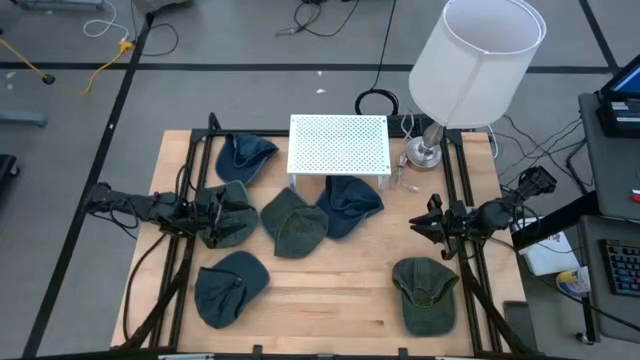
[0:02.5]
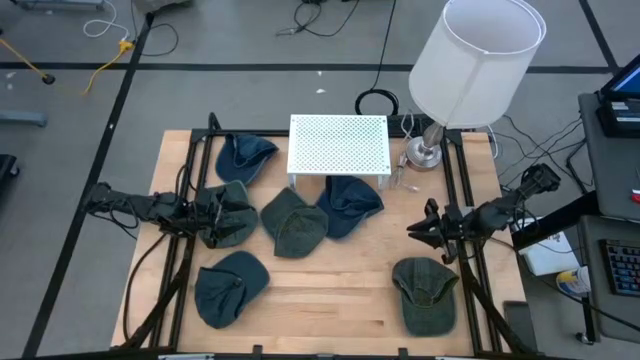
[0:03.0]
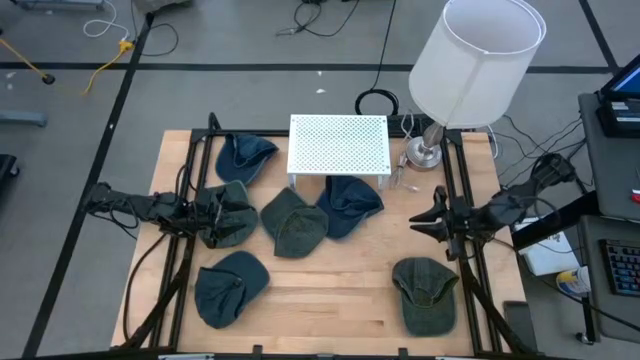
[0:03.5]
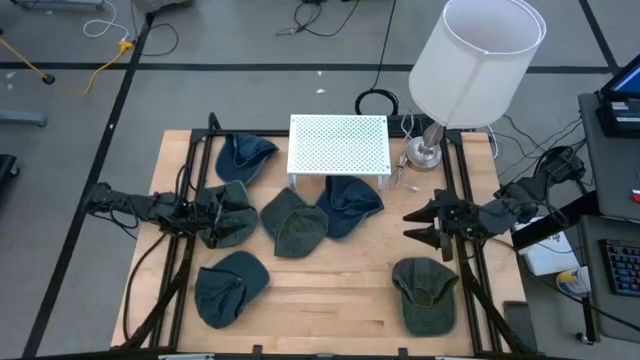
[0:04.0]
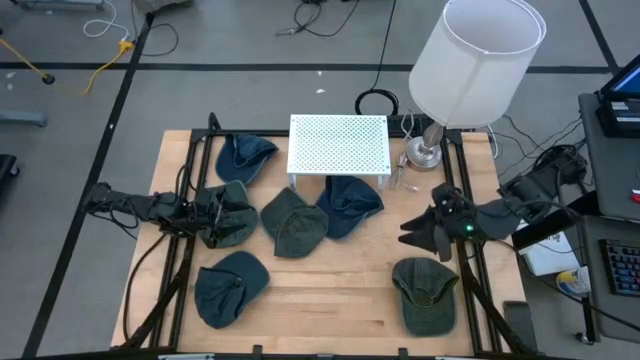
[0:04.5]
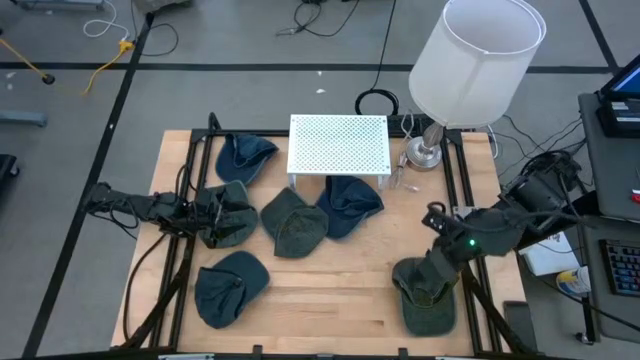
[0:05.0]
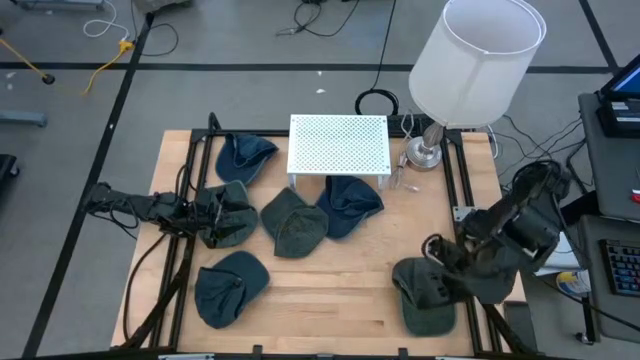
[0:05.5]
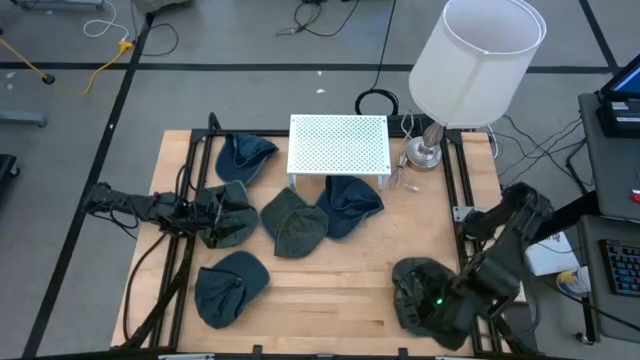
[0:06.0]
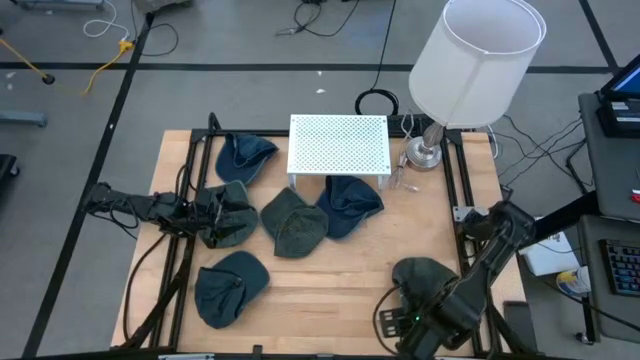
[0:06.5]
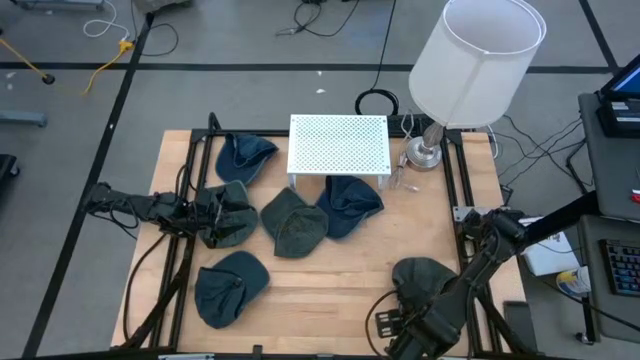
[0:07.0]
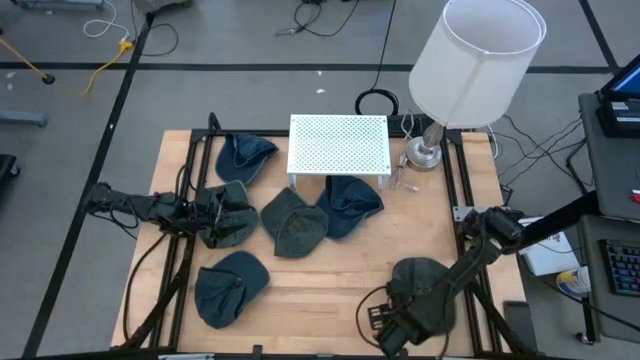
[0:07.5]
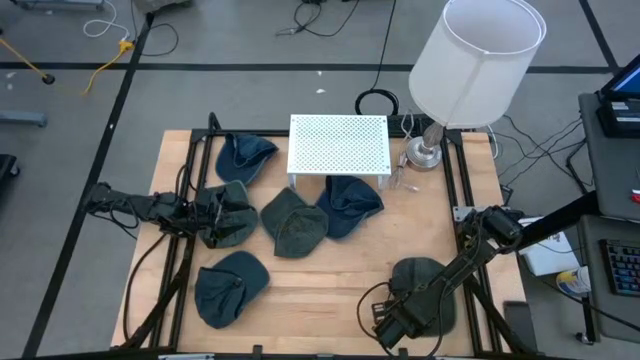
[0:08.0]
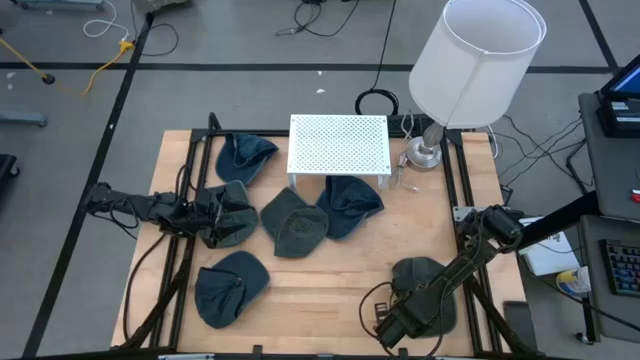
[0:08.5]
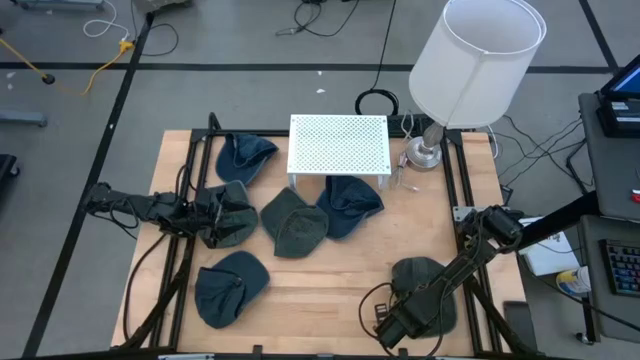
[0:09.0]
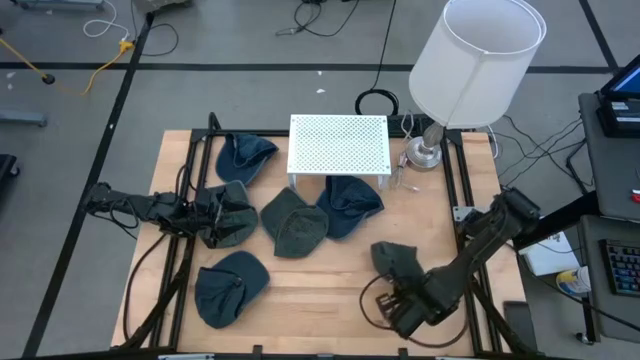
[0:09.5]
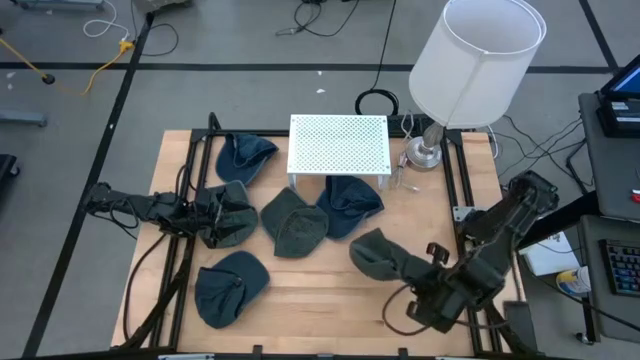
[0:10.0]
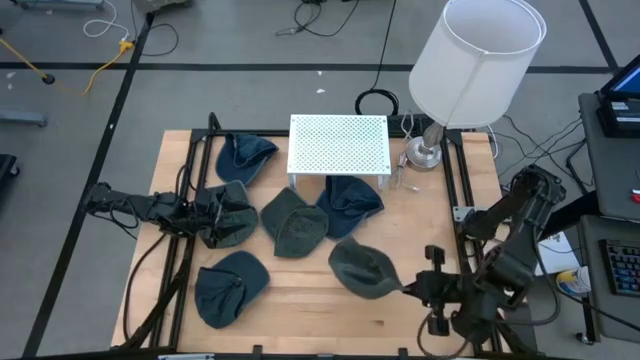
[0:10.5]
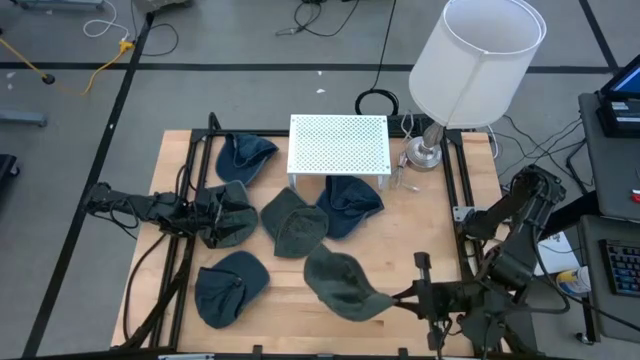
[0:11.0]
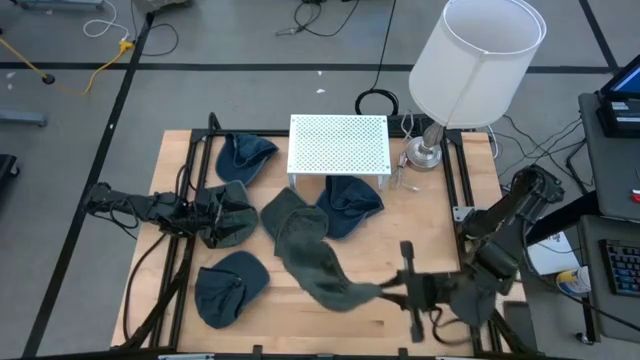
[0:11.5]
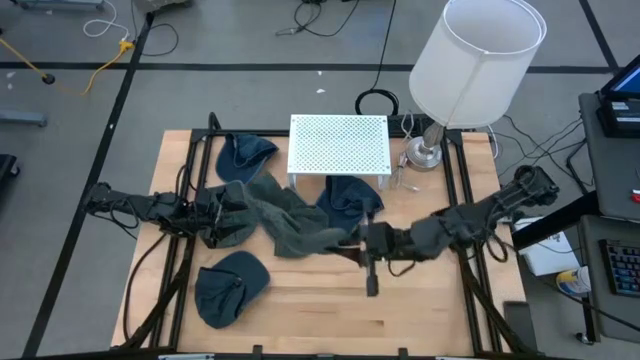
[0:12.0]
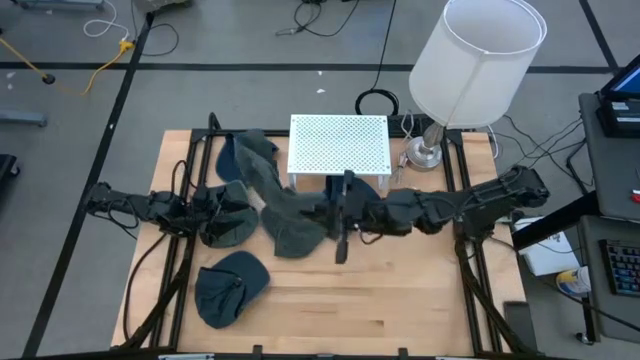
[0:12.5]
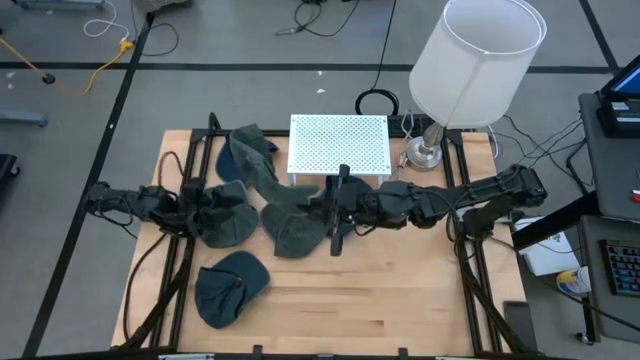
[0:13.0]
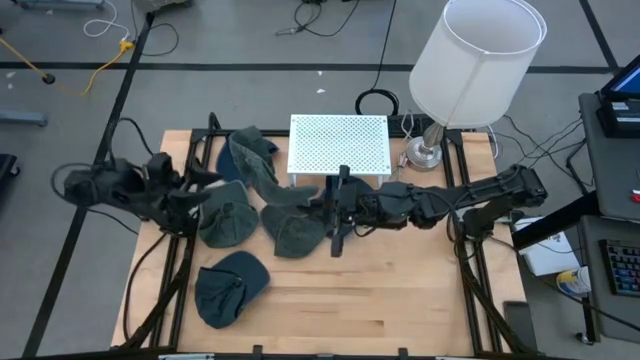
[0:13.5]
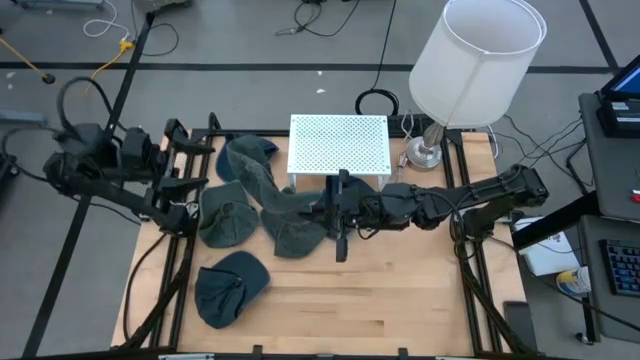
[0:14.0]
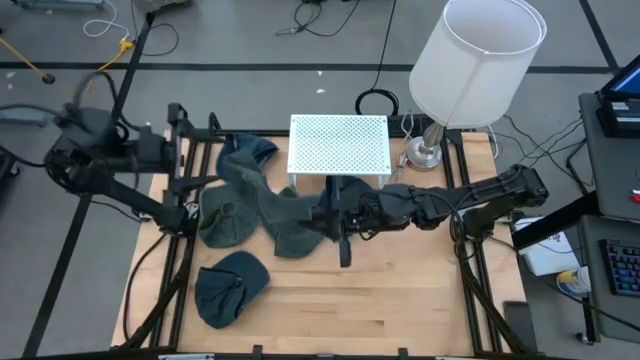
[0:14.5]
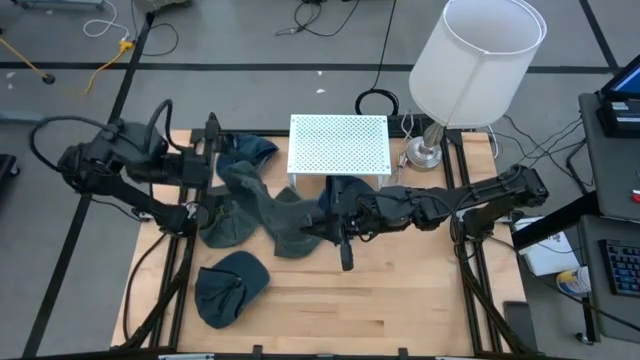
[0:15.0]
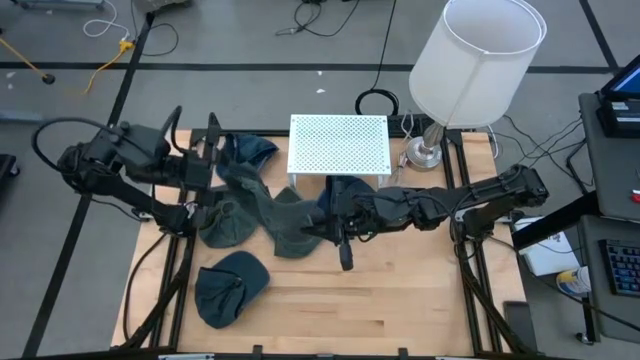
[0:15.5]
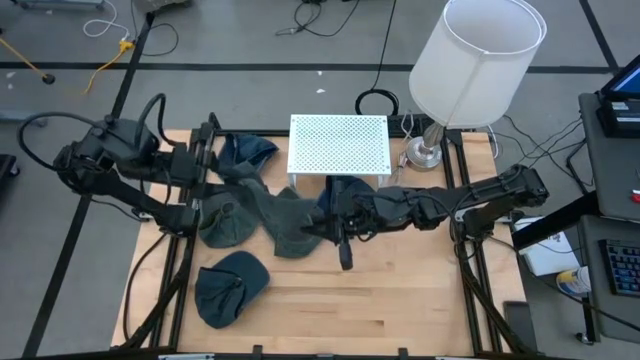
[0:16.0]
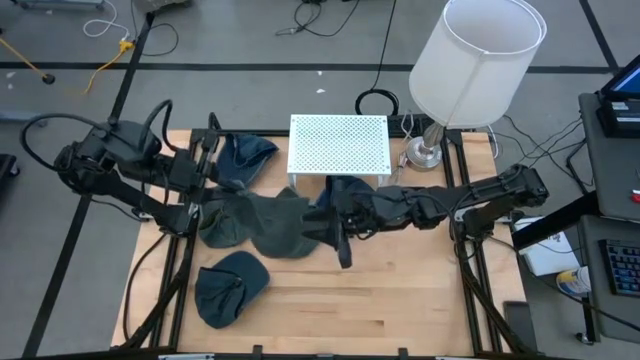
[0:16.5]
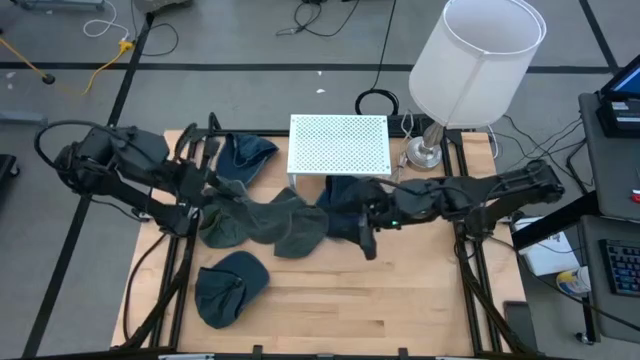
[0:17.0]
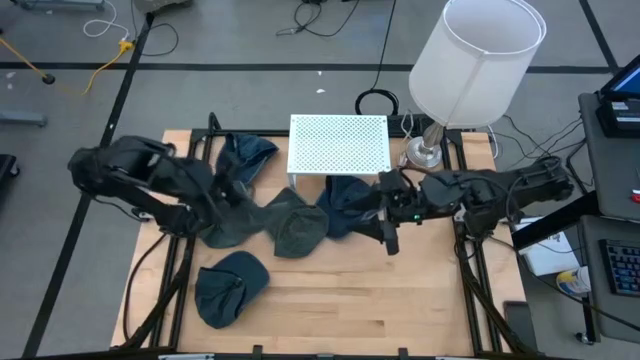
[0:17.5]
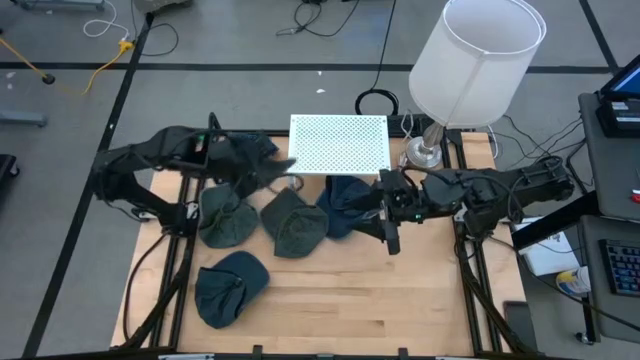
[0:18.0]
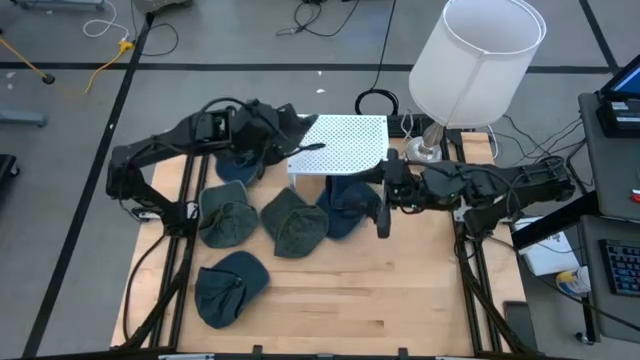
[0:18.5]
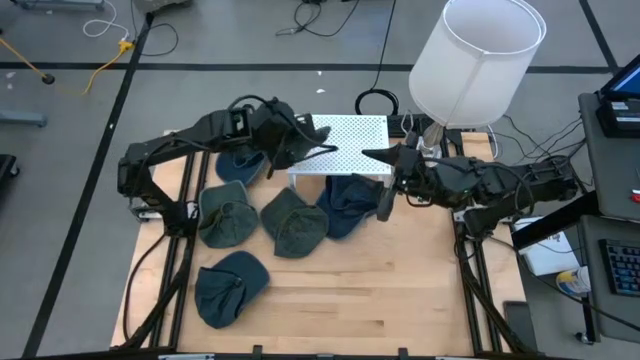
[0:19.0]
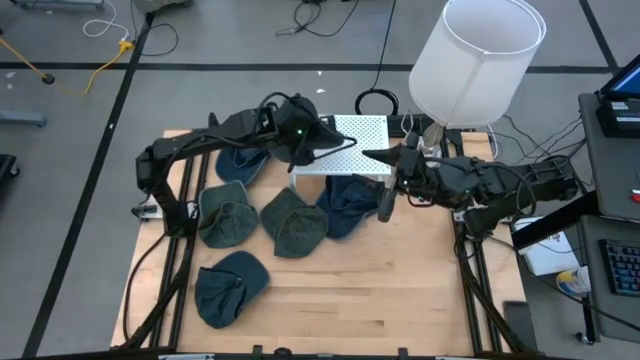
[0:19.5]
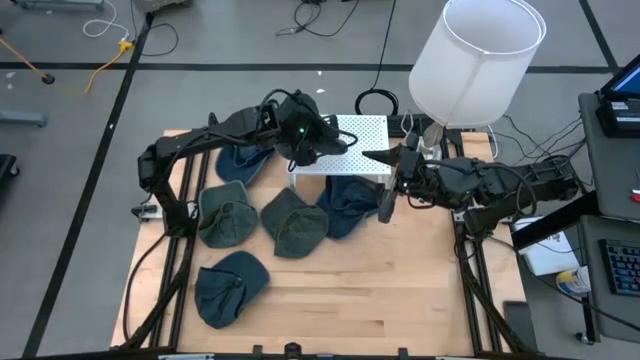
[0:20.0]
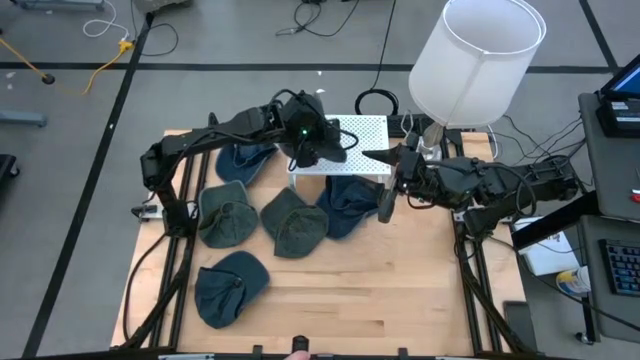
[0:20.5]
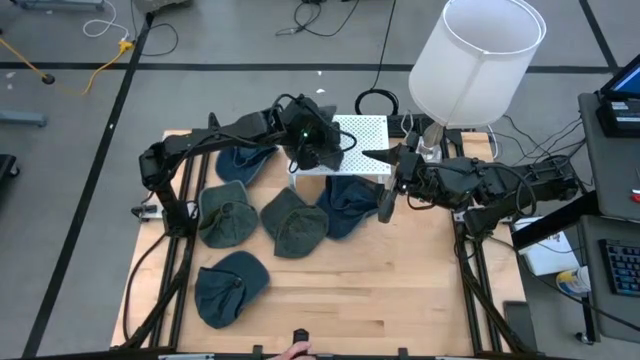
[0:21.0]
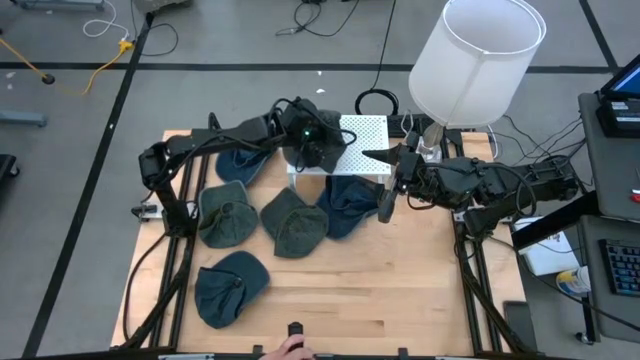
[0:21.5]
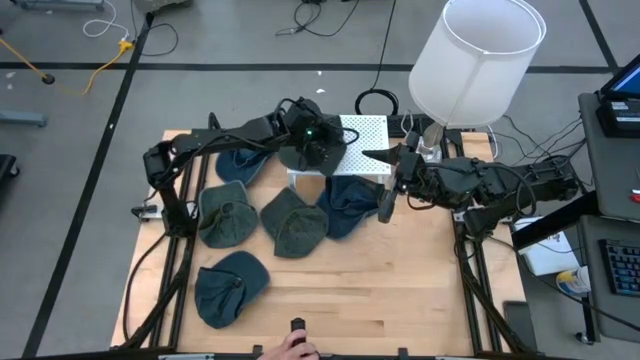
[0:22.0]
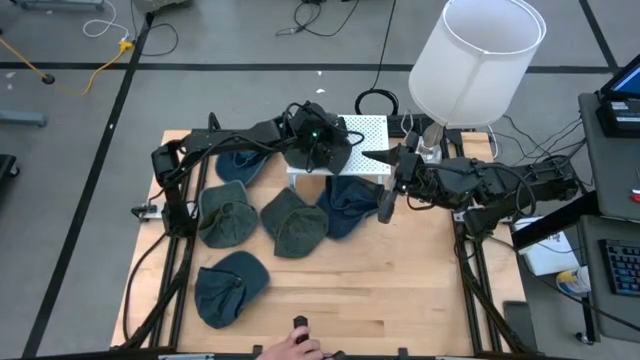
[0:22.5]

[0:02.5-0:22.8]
Task: Pick & Place hat
Put the bottom right gray cap on the shelf
